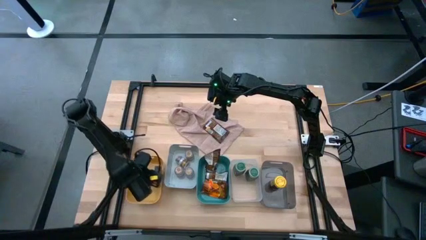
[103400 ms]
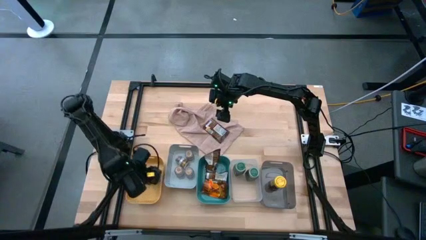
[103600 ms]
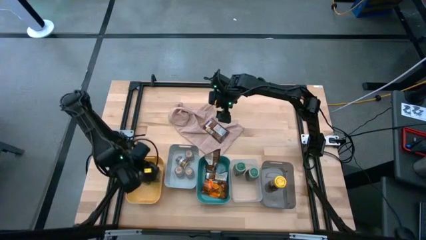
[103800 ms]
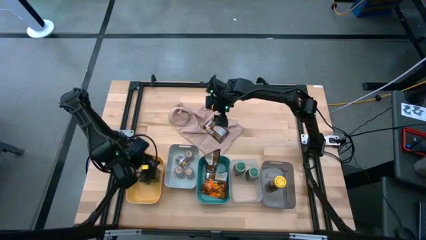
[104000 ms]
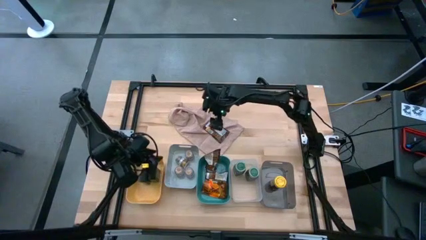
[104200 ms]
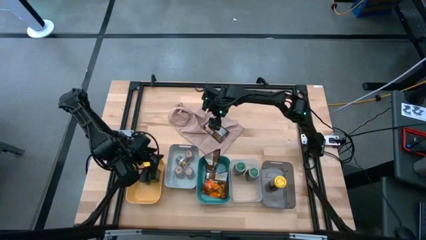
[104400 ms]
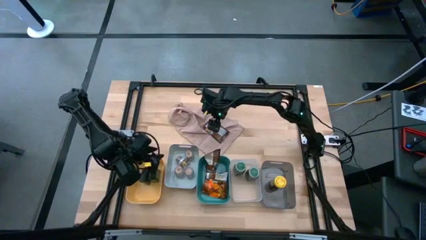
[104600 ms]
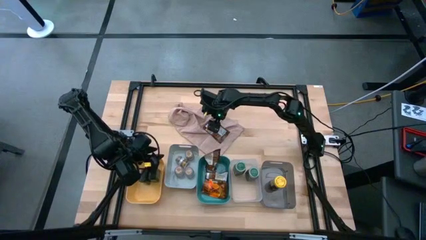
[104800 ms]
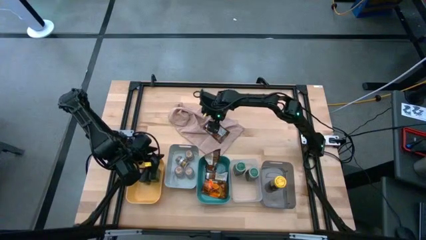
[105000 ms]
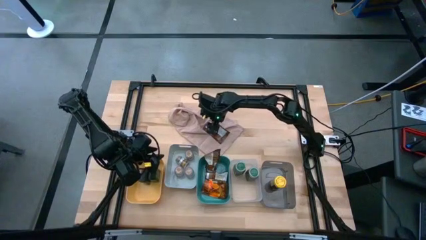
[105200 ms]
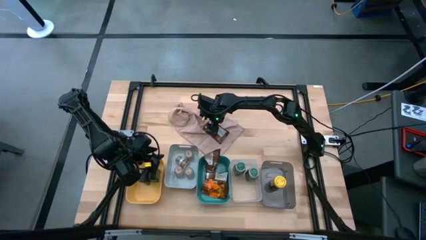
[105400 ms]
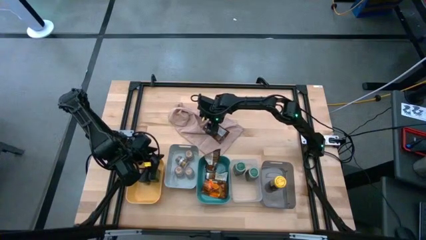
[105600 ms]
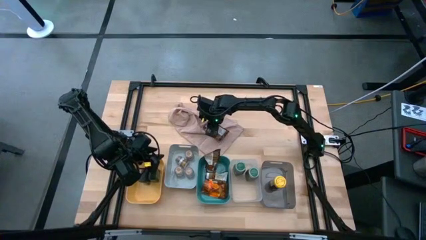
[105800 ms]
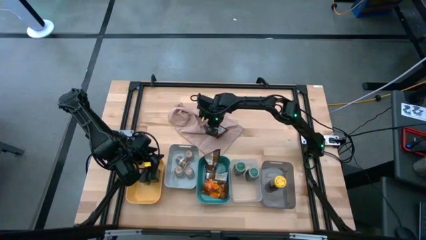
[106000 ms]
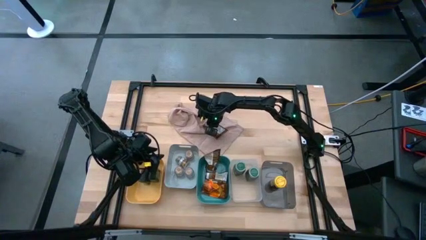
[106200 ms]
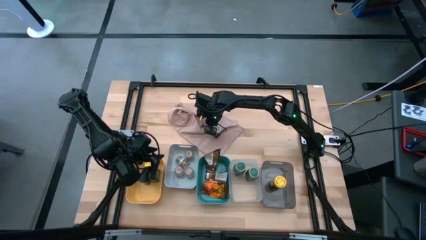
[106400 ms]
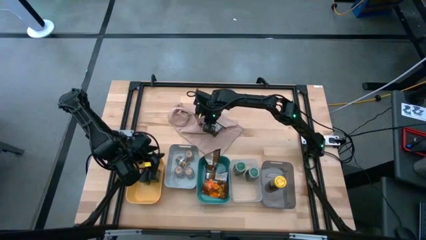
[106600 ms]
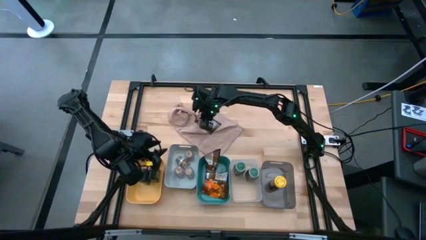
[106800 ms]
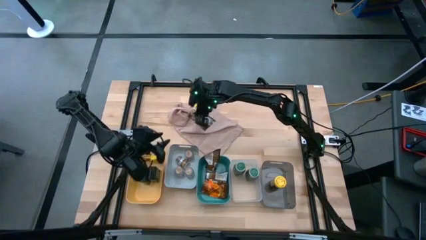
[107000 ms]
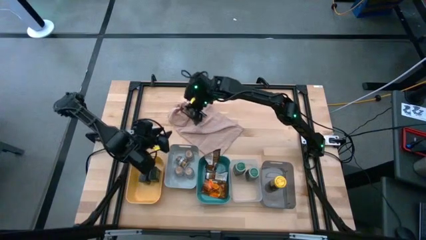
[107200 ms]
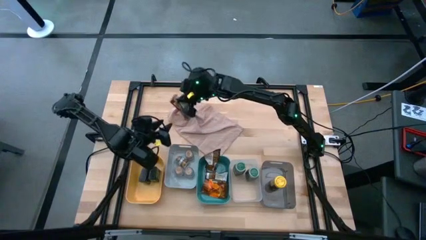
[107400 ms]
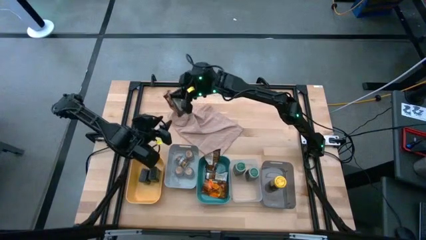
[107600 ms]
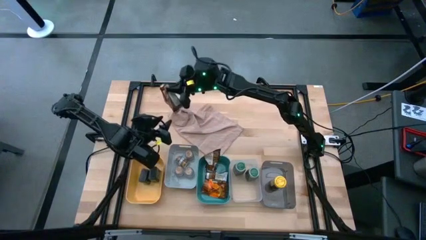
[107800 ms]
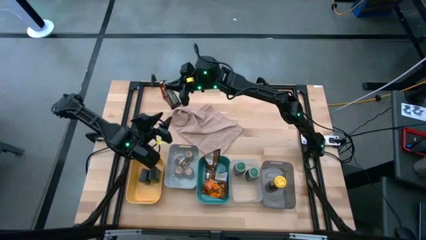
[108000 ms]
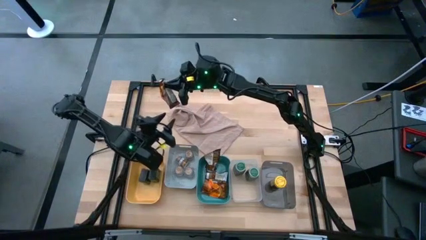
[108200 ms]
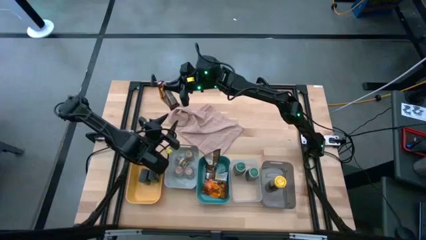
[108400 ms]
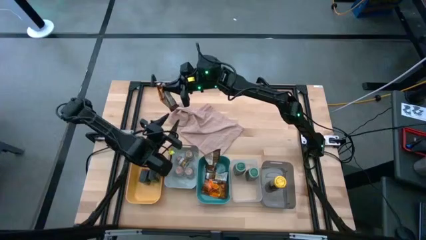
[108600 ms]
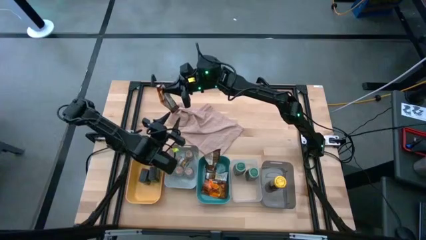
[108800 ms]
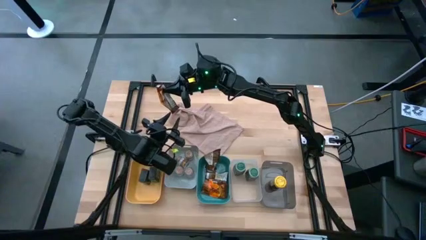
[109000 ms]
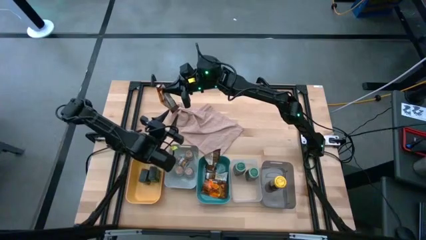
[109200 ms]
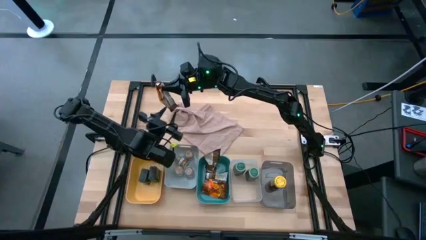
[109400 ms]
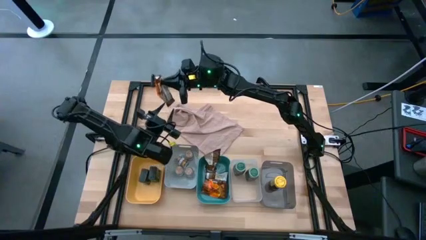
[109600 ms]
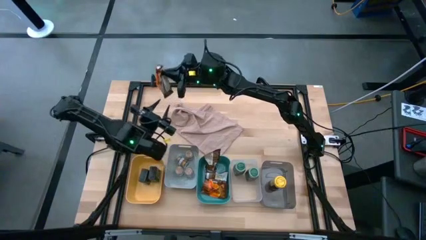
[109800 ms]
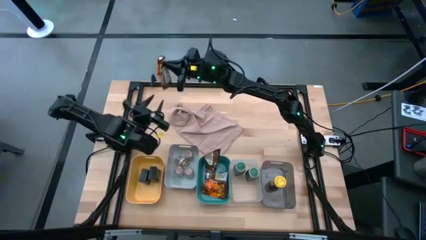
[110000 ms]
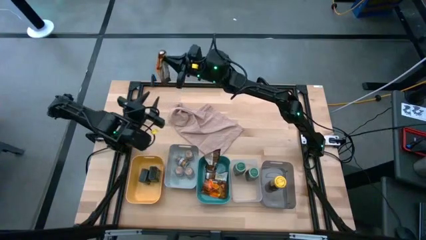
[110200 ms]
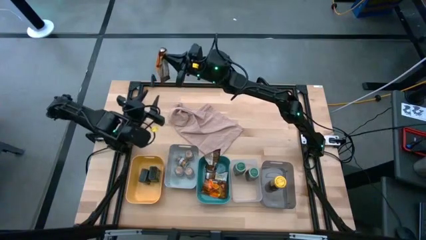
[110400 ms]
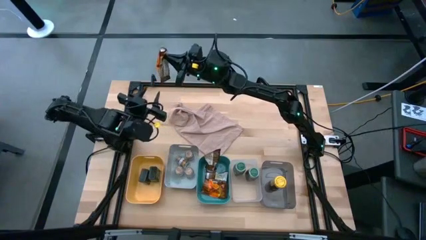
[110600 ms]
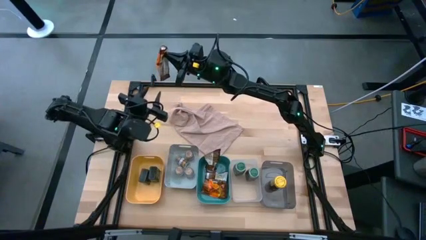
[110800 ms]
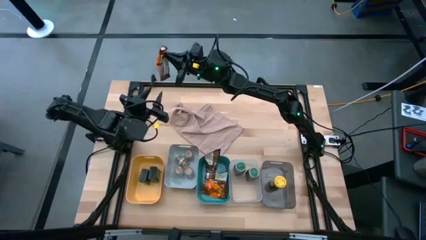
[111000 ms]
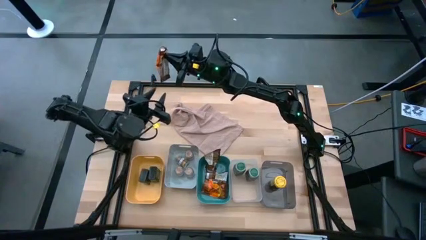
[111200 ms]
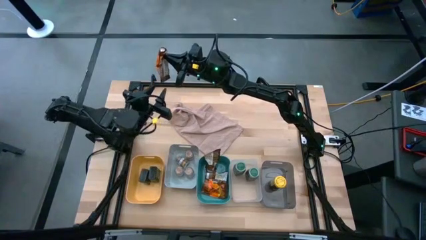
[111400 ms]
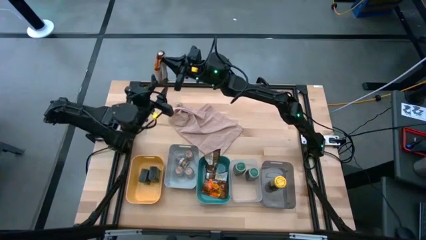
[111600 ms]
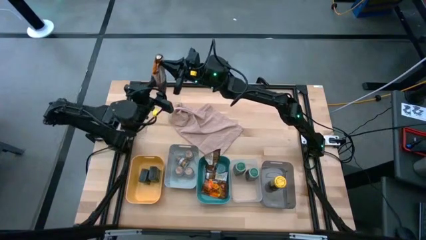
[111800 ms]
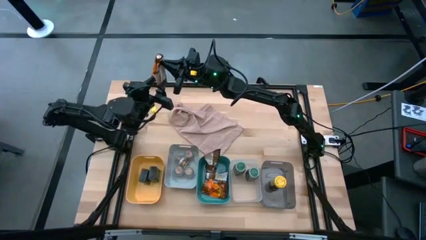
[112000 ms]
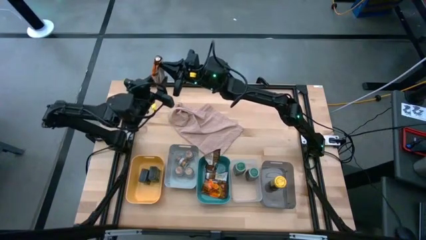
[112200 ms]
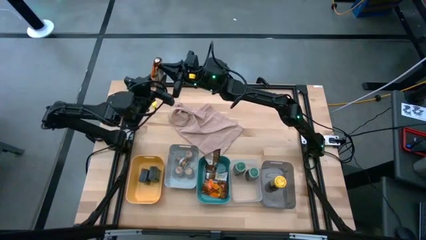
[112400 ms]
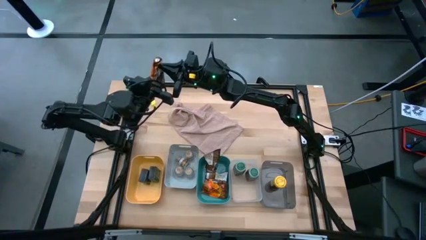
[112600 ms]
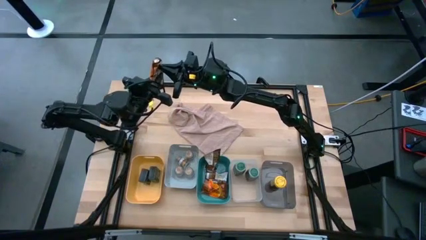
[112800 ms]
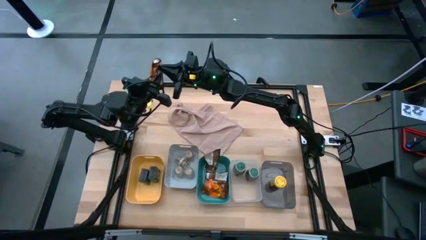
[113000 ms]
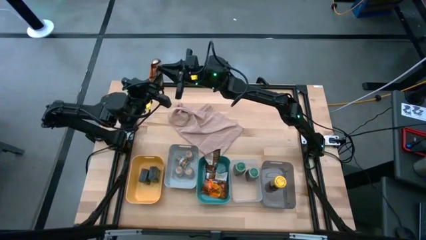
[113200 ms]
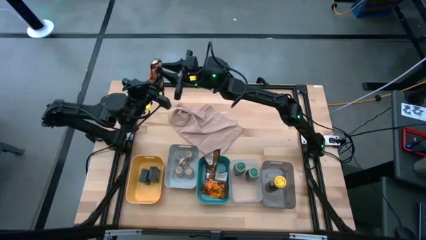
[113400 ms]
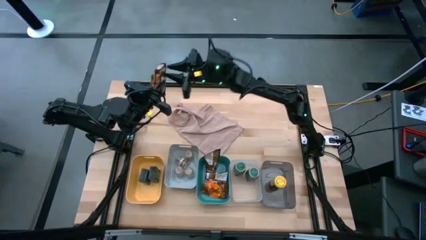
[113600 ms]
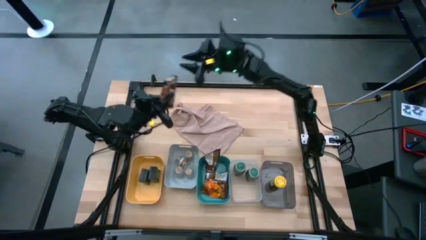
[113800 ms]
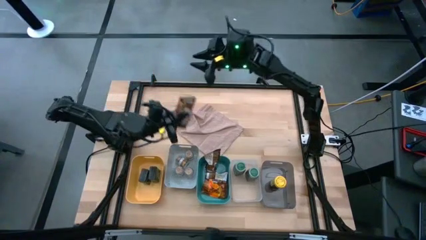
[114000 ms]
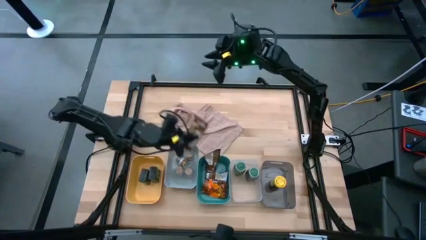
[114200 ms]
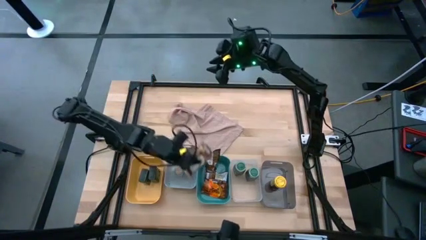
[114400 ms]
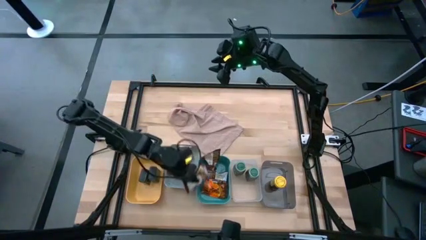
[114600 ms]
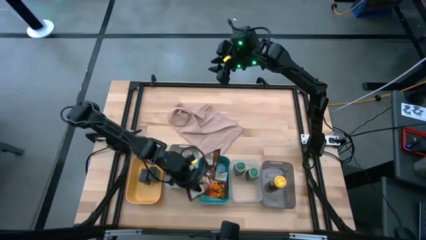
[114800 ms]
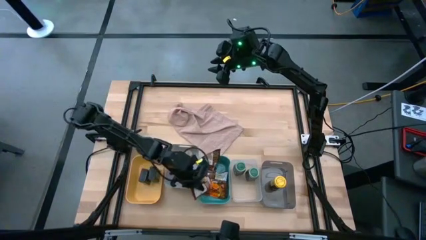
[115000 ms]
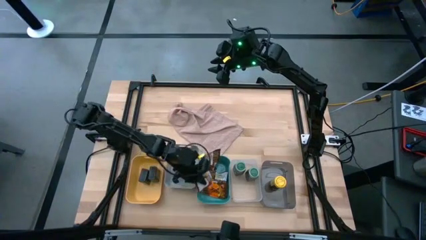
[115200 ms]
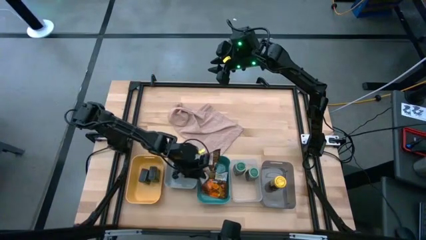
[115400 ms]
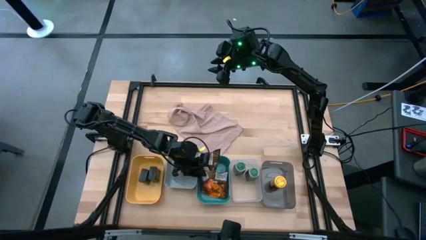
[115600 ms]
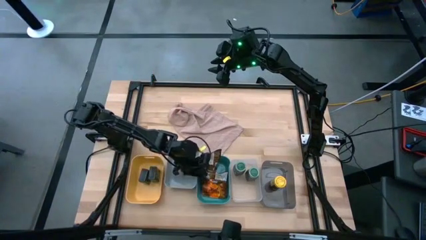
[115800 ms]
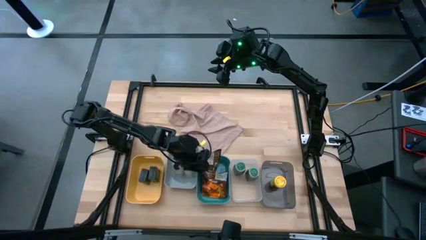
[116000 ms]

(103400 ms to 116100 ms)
Task: Sort spices by type
Put the orange seasoning bag into the green bin
